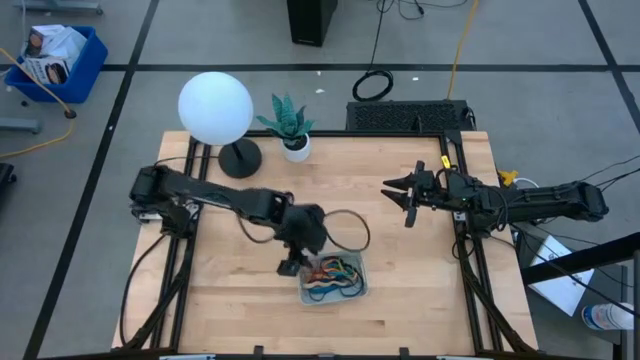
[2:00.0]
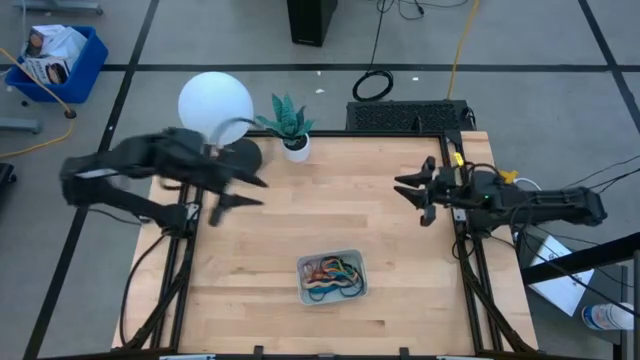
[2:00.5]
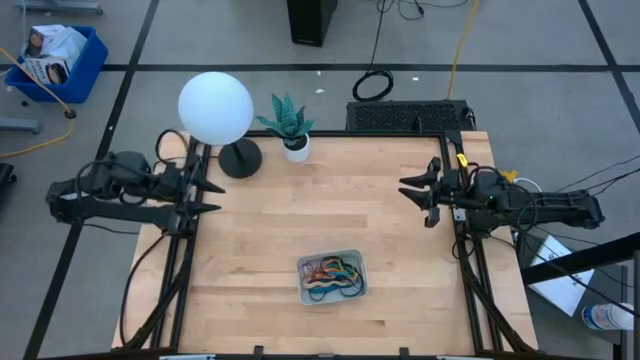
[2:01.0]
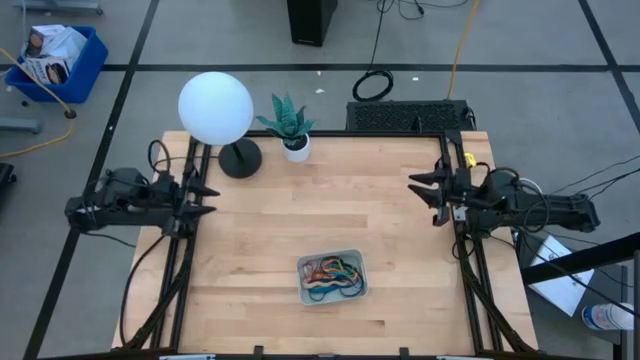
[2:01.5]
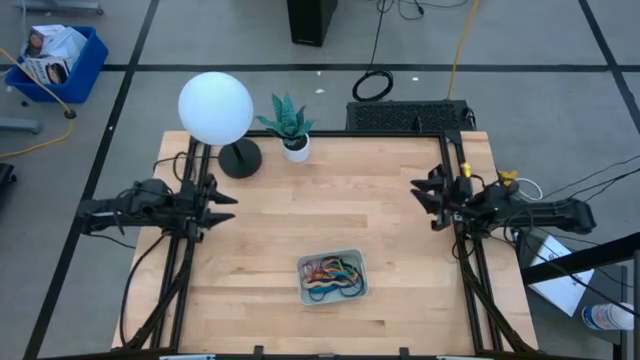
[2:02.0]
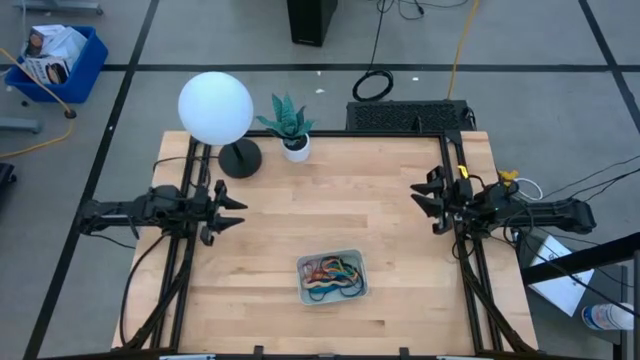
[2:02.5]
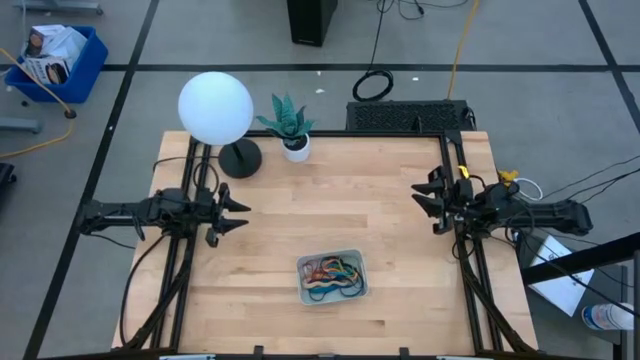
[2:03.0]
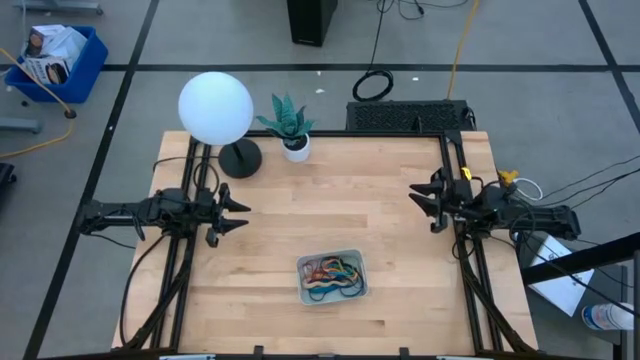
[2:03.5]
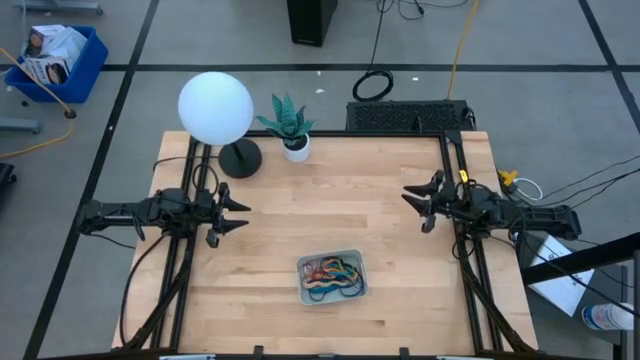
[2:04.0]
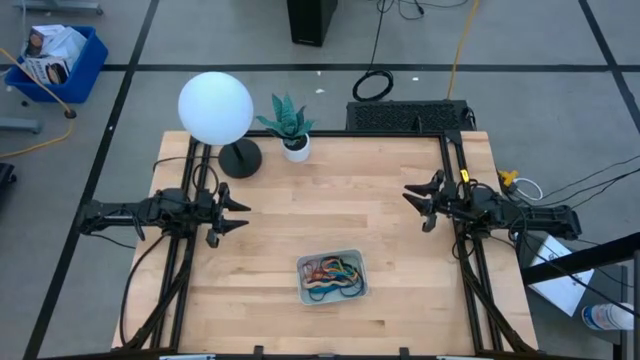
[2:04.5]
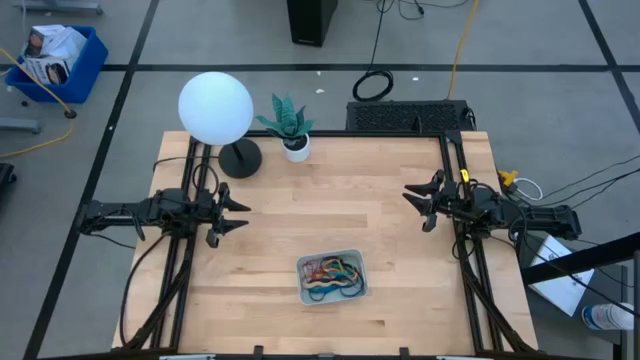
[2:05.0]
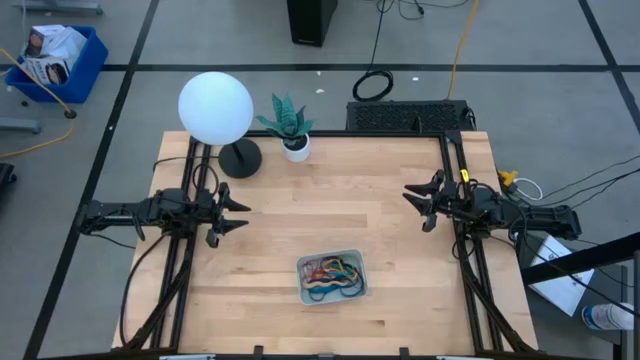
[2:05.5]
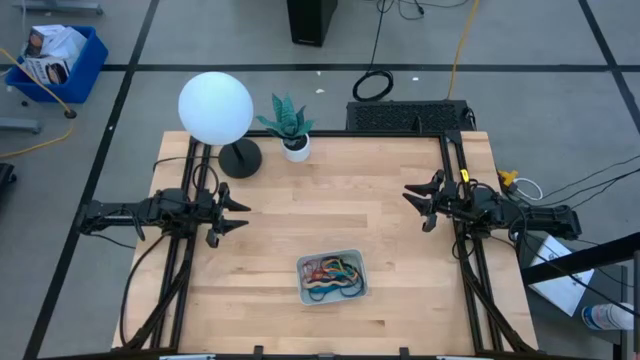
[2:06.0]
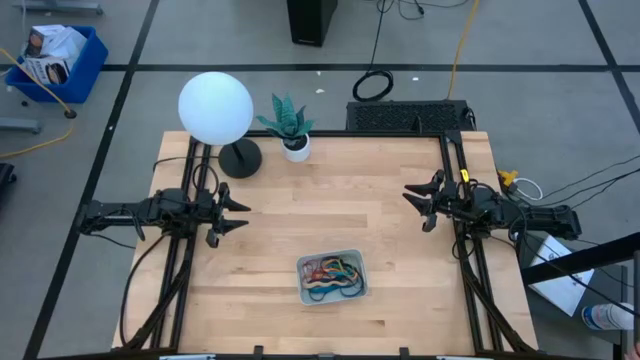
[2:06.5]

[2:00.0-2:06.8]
Task: Pick and place rubber bands into bin
Return to Home Position

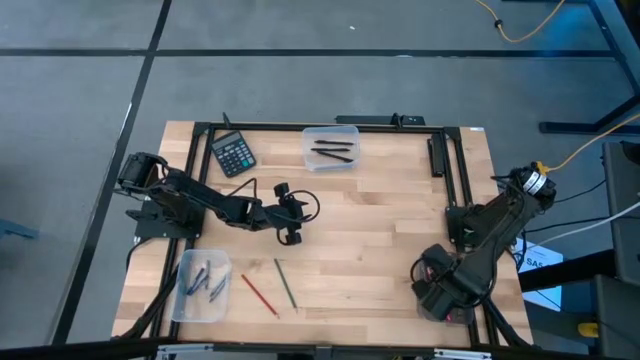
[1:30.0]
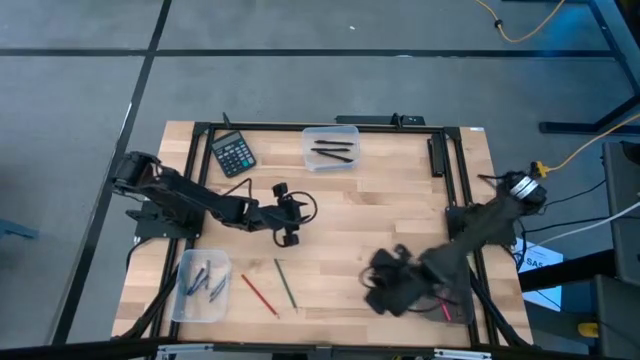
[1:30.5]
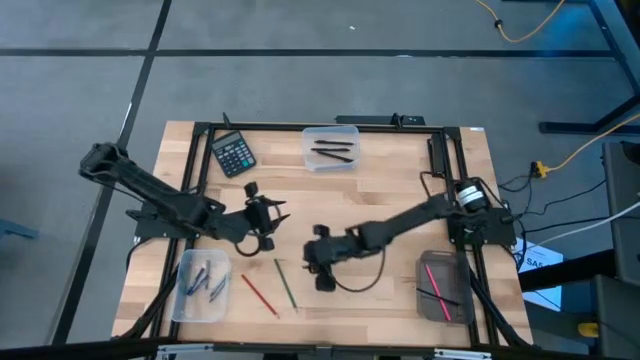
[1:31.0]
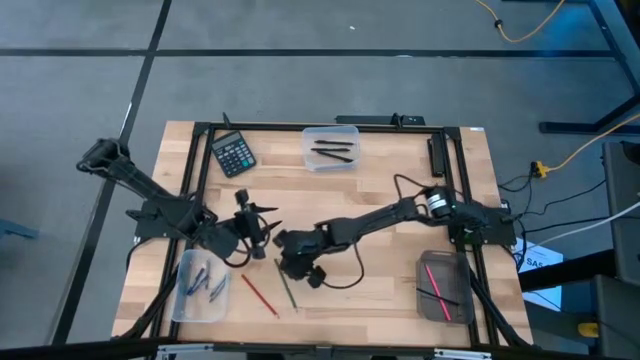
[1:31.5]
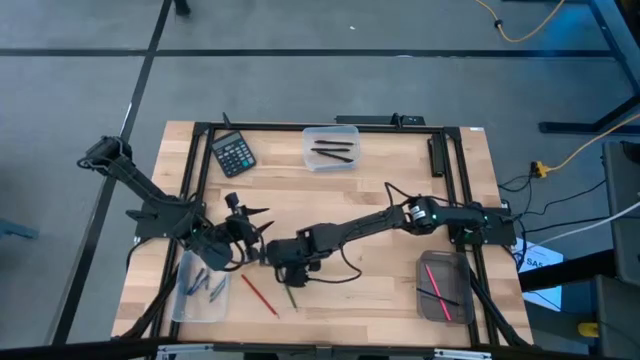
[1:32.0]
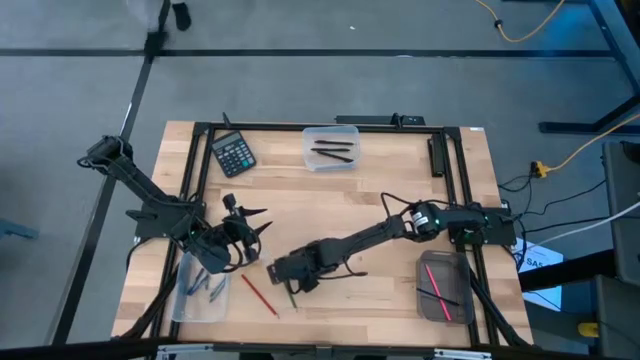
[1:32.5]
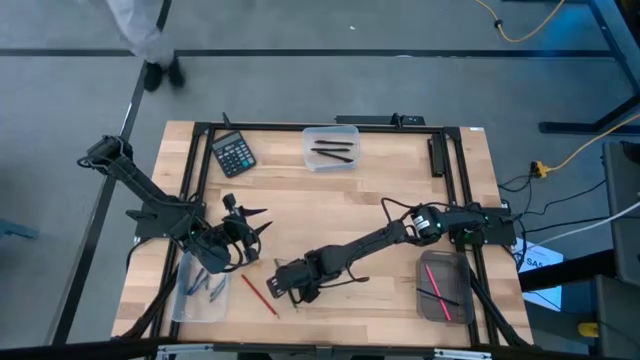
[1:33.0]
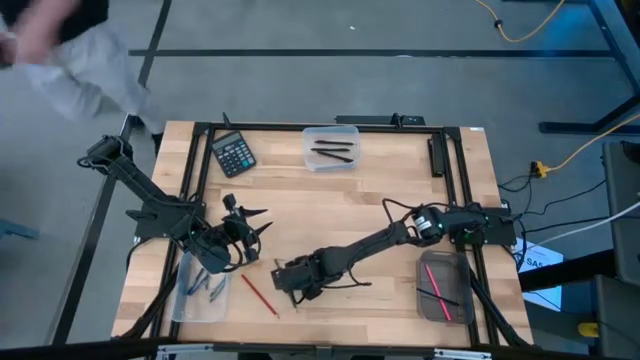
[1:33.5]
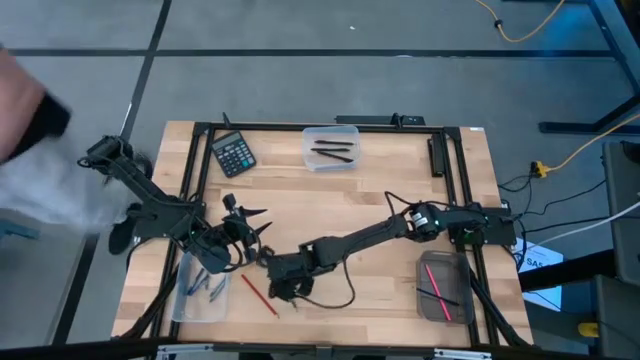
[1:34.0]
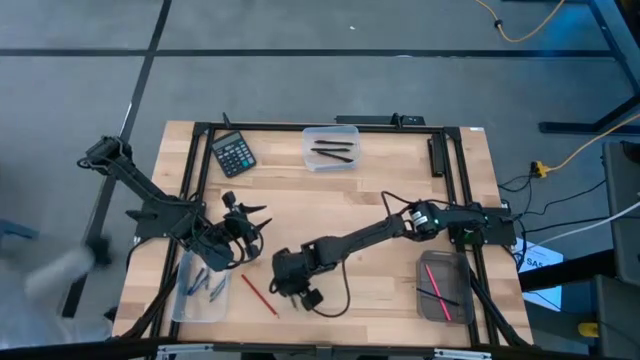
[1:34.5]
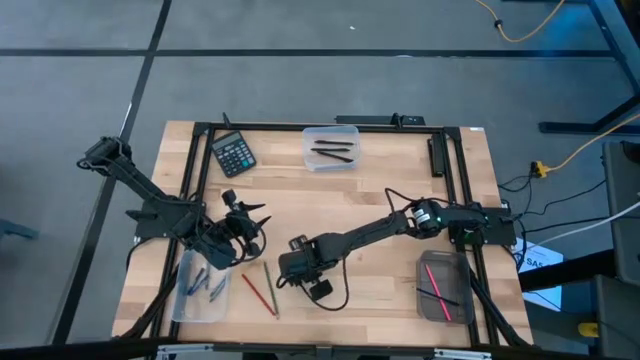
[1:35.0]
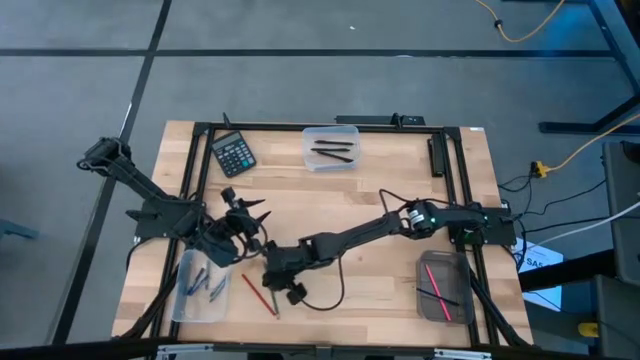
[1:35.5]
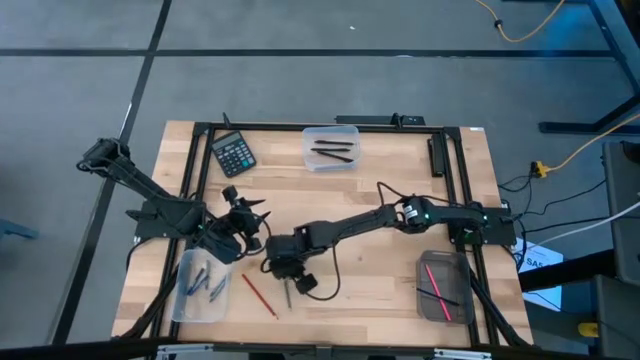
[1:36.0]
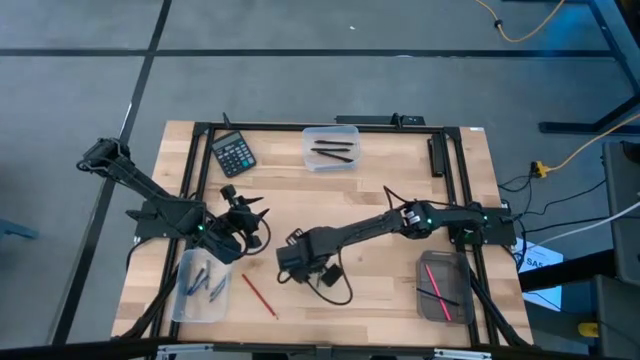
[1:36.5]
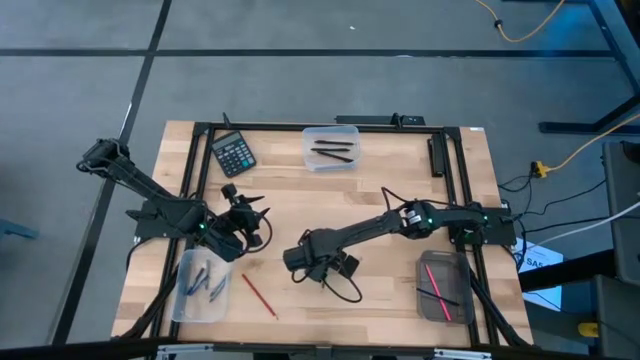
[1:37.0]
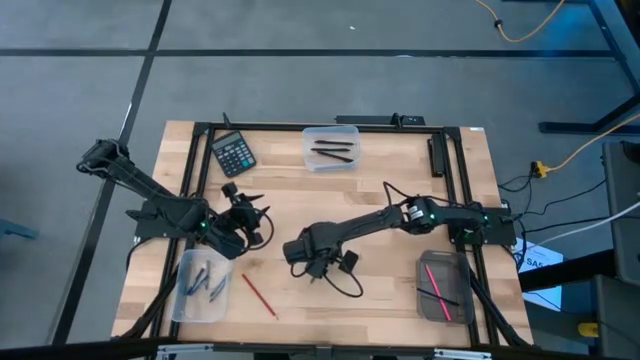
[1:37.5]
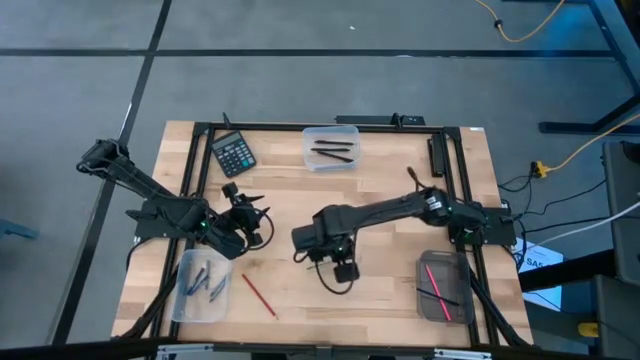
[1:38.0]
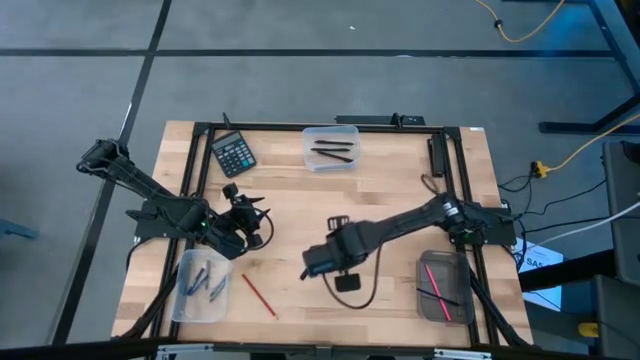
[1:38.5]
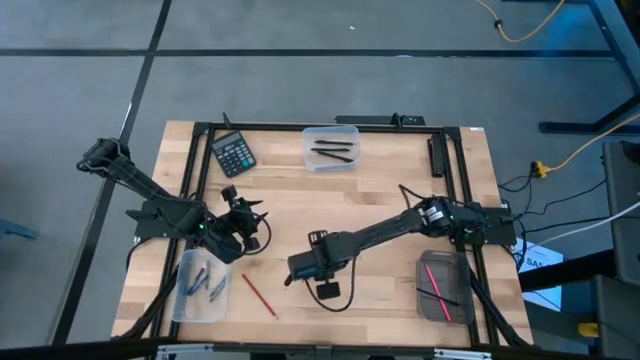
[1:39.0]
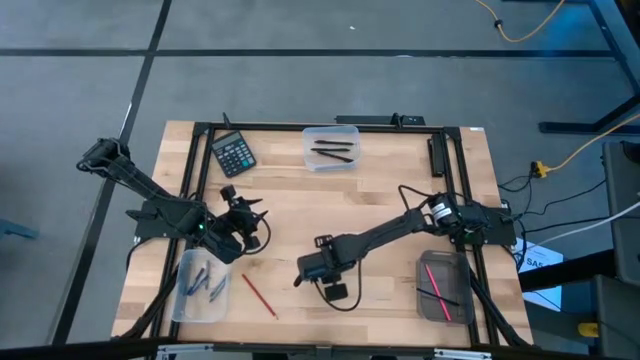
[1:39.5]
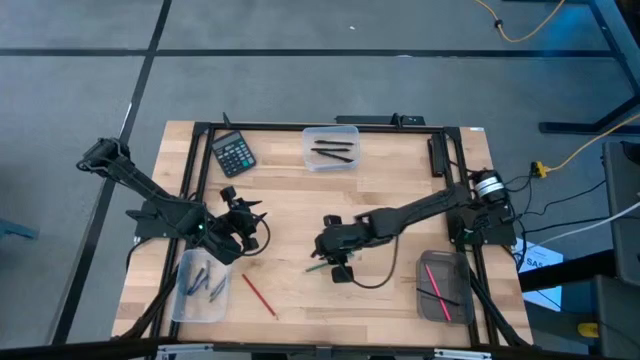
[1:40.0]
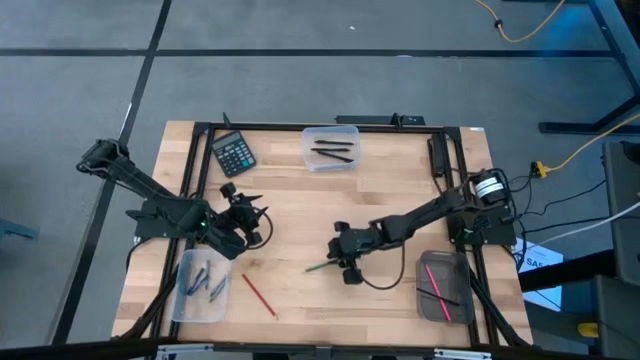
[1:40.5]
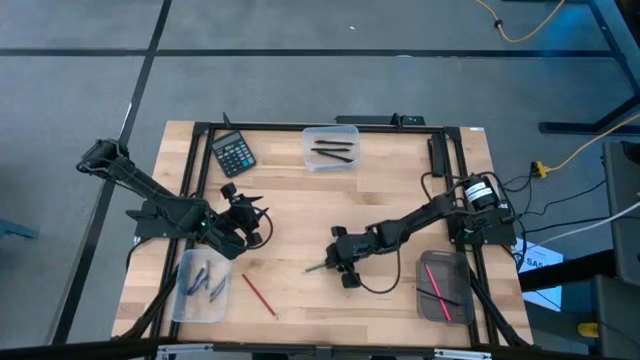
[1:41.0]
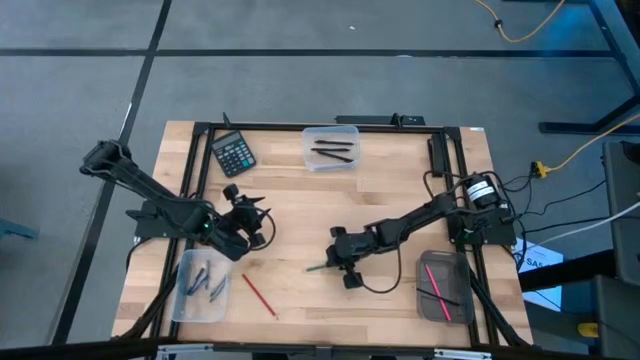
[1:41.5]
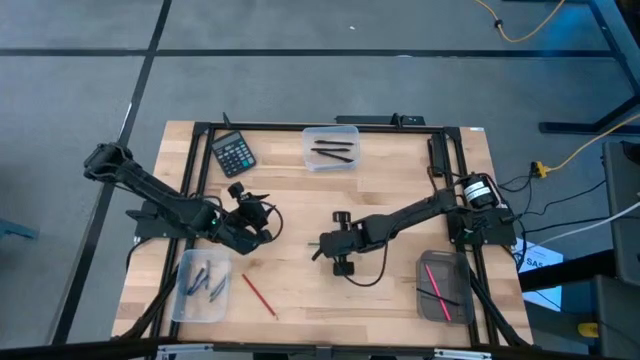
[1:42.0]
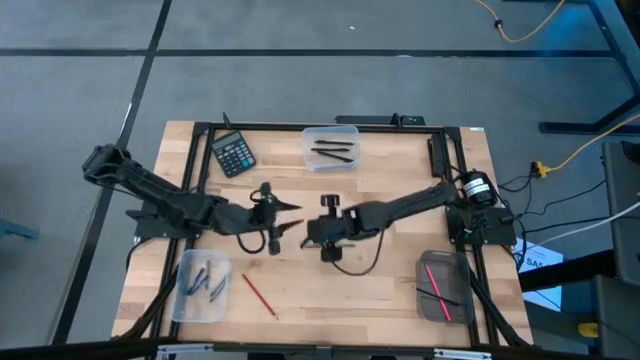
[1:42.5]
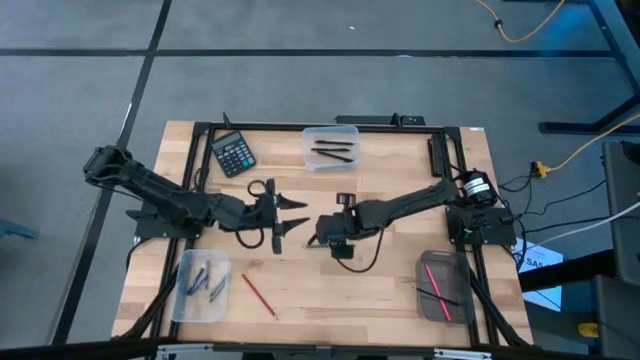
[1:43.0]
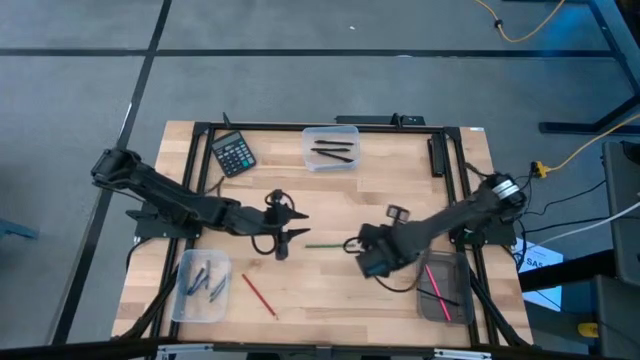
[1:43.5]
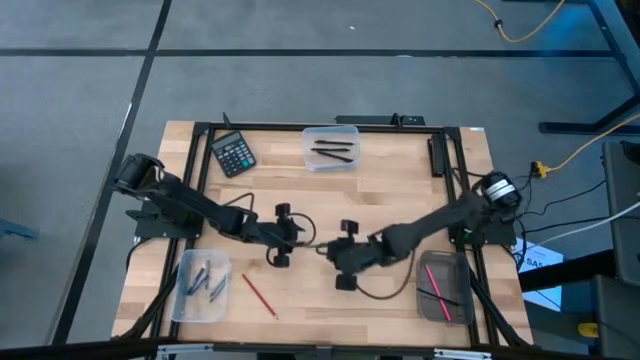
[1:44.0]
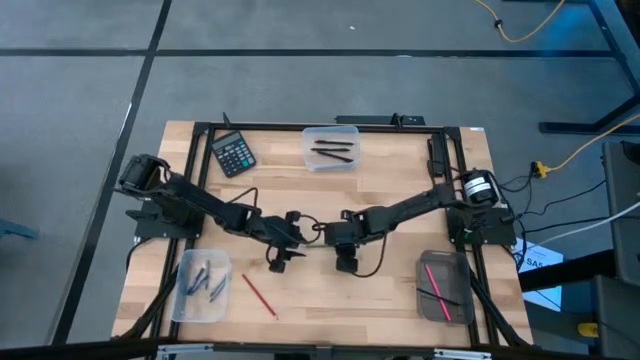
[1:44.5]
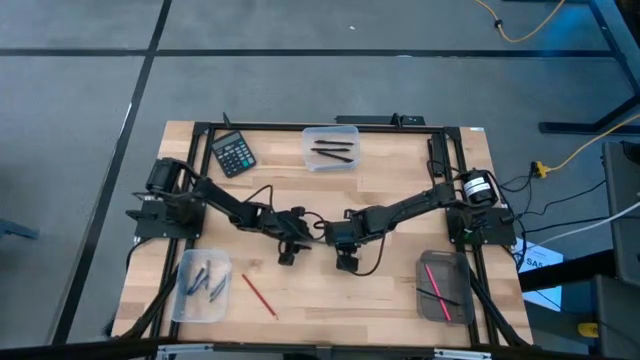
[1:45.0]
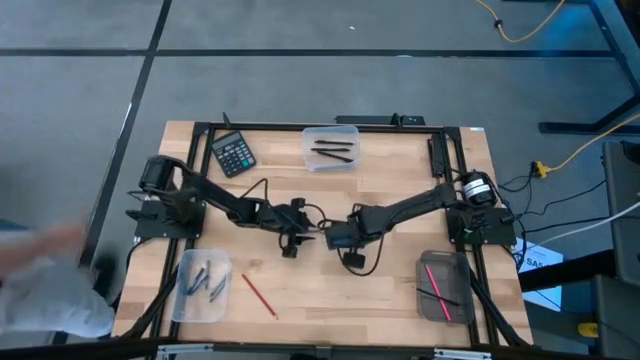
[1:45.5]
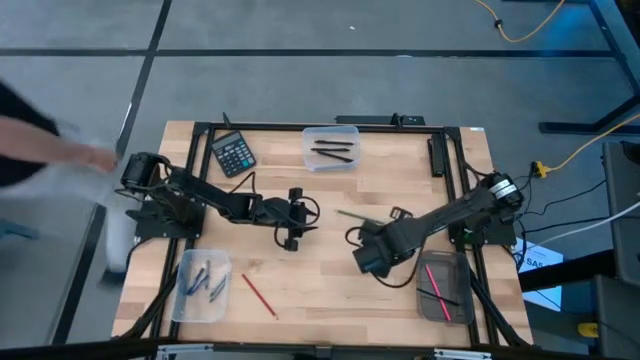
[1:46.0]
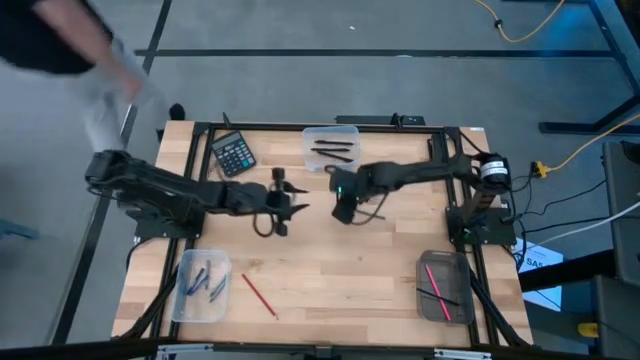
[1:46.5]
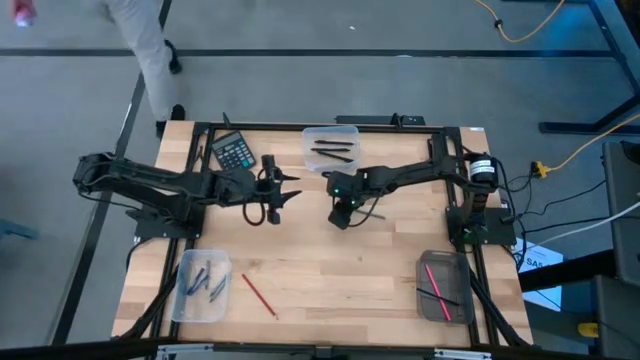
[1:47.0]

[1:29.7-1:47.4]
Task: Sort crayons/erasers/pens/pencils in bins
Put the green color pencil into the black bin
